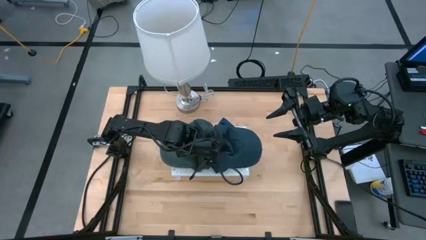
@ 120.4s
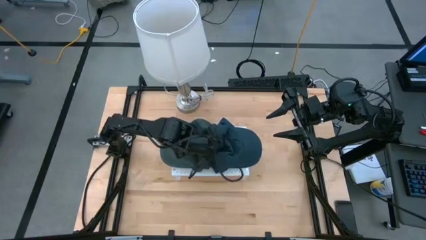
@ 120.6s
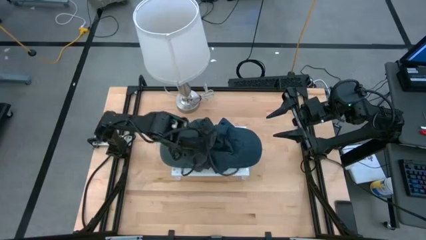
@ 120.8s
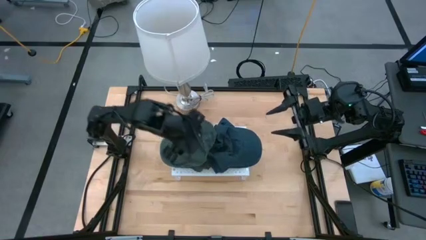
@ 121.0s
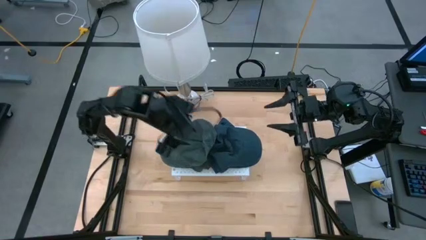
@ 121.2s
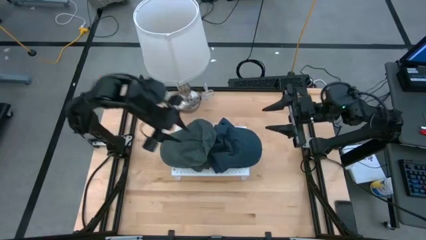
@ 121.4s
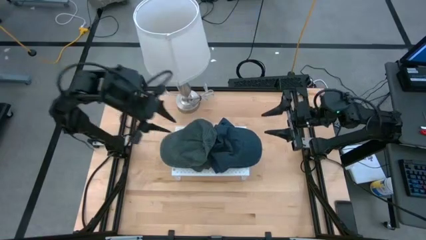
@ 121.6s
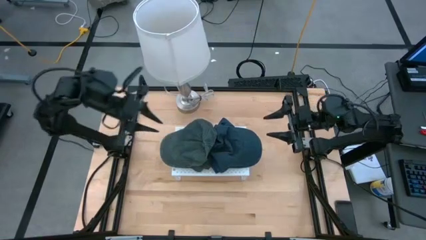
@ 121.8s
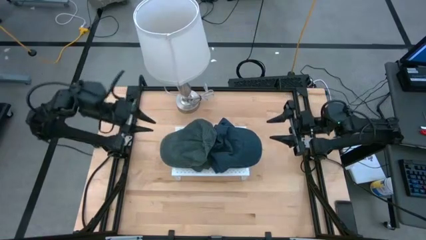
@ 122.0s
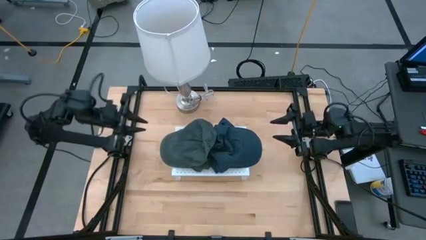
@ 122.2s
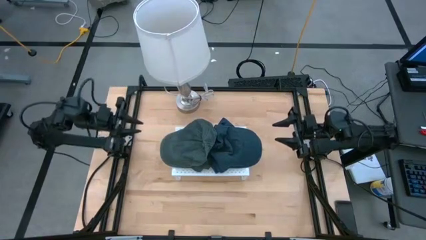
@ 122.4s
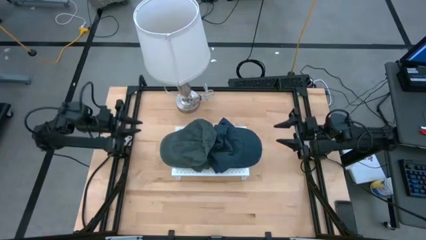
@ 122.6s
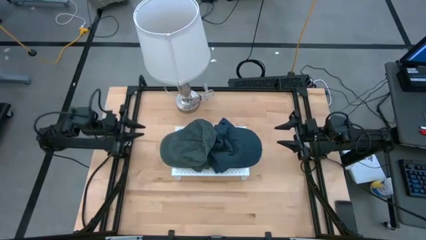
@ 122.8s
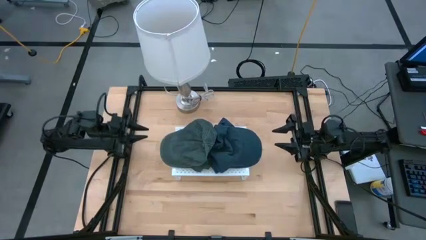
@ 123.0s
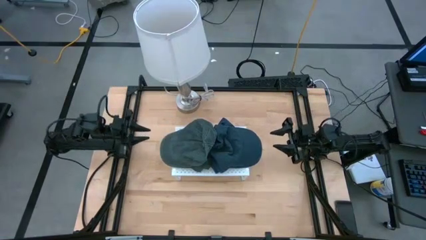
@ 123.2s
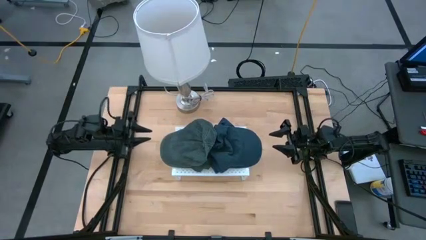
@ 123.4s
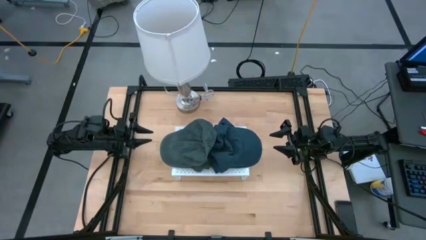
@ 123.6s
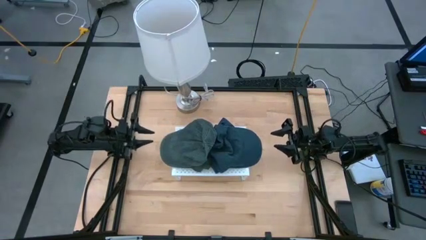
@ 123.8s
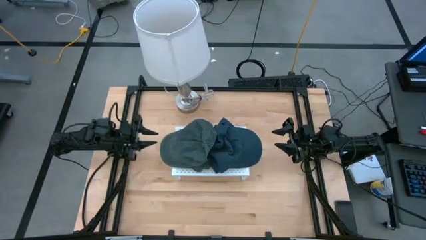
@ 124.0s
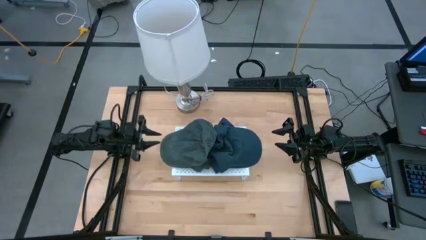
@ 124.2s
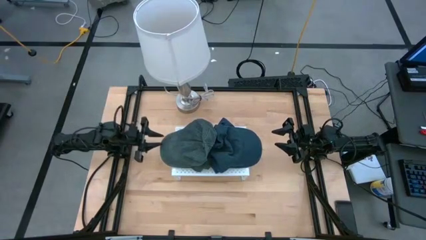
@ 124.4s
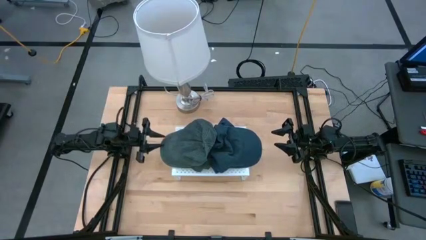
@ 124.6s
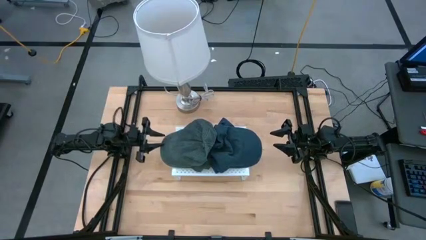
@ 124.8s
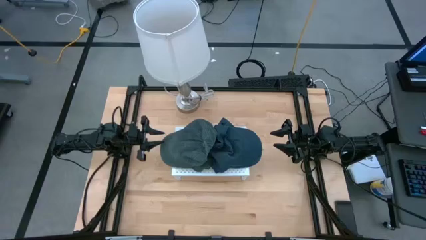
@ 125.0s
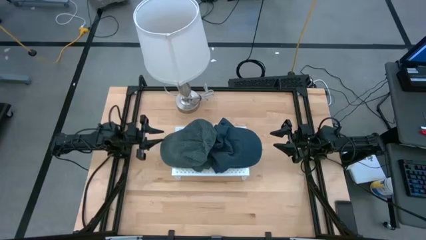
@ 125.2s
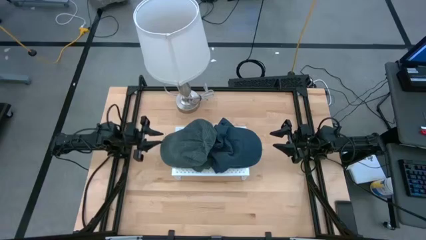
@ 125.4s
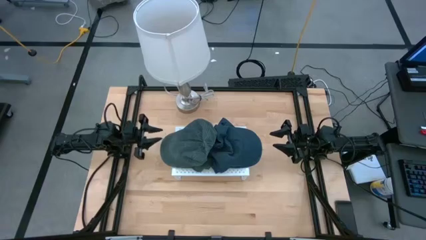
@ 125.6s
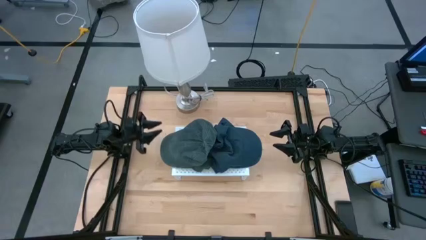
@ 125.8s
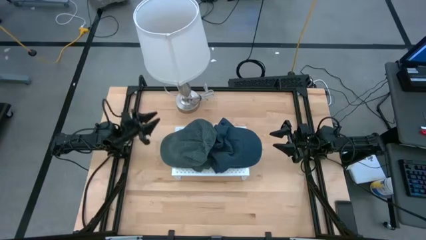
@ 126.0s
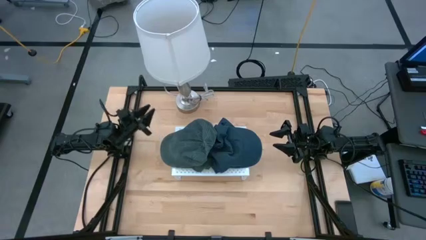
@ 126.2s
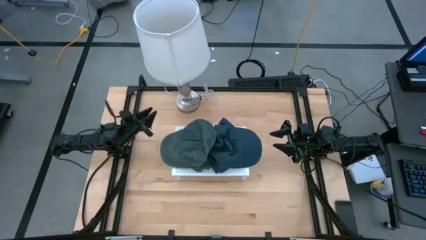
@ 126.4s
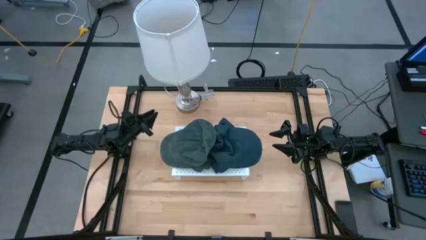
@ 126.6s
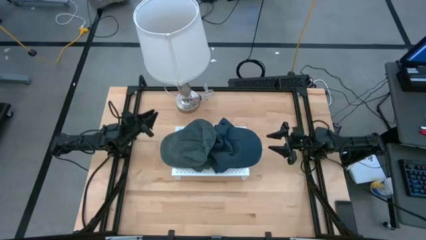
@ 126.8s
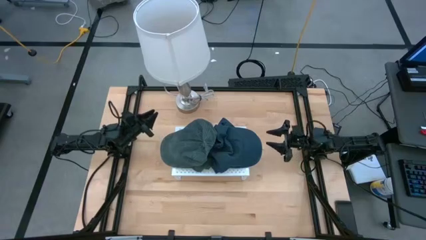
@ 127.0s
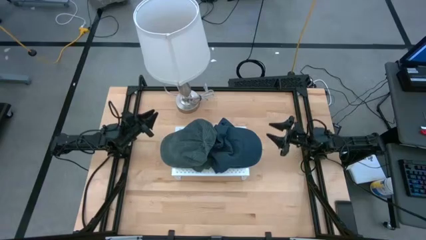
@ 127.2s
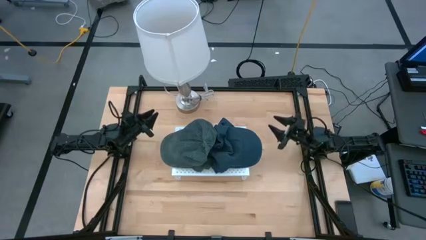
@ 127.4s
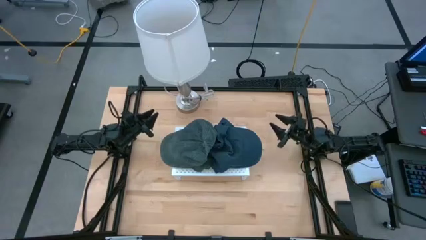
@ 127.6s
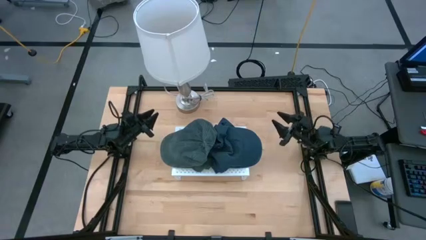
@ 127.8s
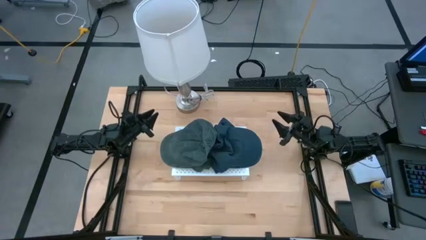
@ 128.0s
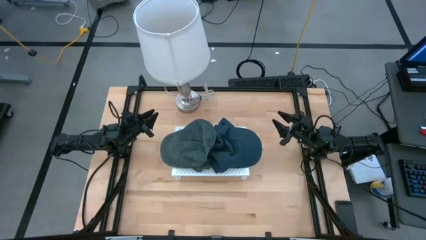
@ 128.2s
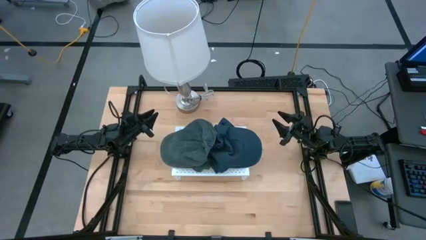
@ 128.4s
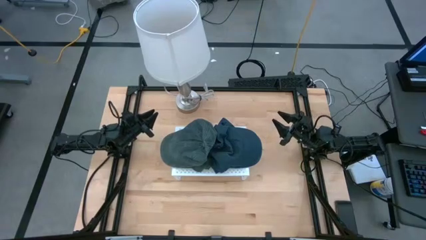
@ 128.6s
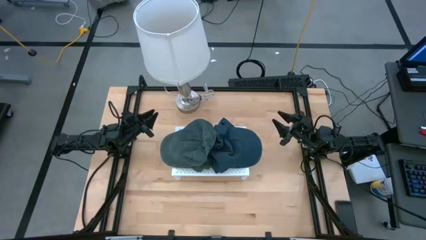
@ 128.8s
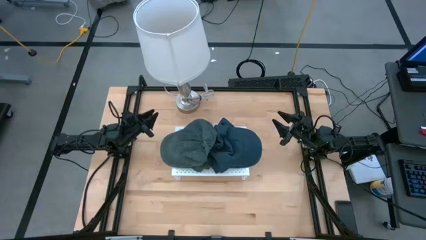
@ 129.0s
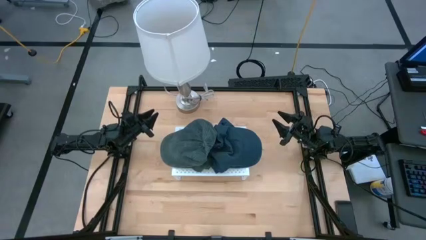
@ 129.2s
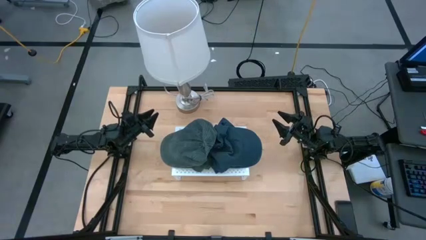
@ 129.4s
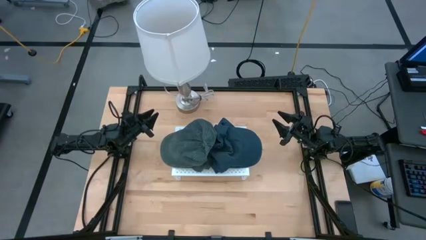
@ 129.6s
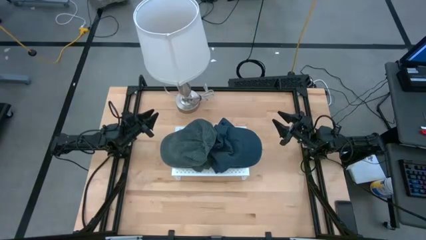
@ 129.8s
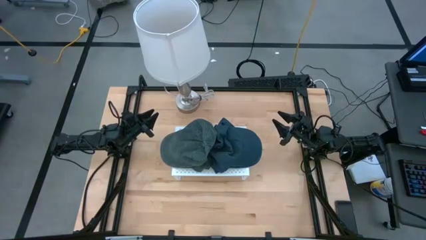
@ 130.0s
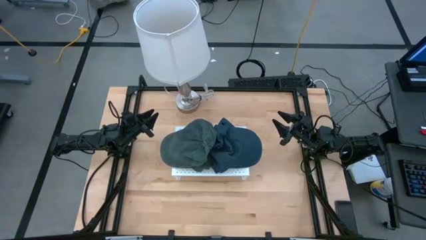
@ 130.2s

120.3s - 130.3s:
Task: Pick & Place hat
Return to Home Position

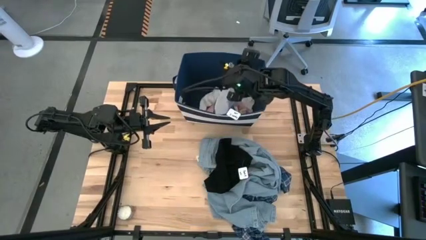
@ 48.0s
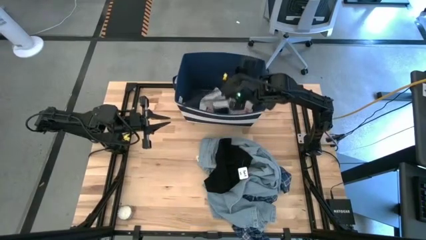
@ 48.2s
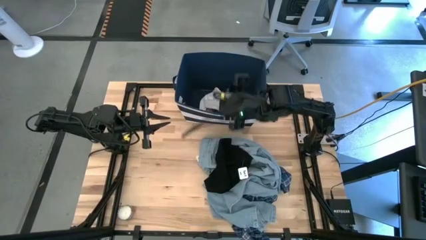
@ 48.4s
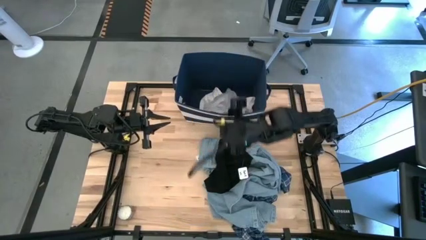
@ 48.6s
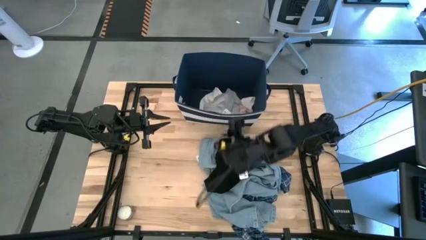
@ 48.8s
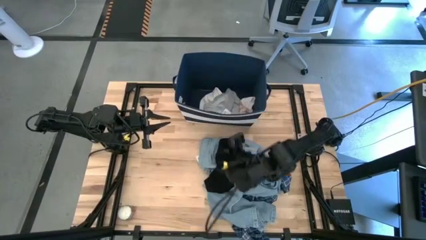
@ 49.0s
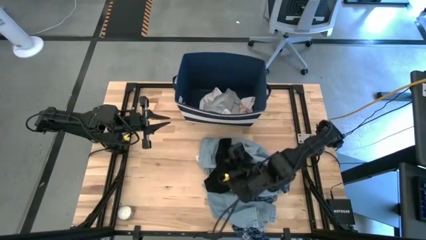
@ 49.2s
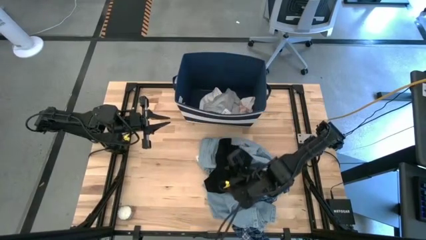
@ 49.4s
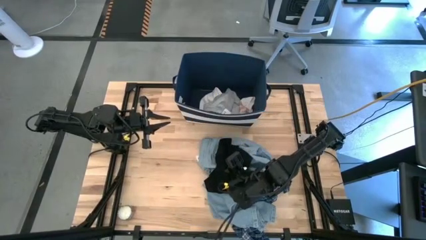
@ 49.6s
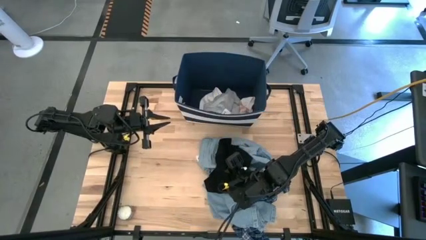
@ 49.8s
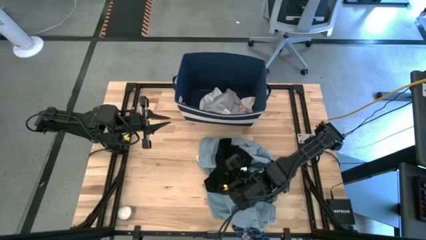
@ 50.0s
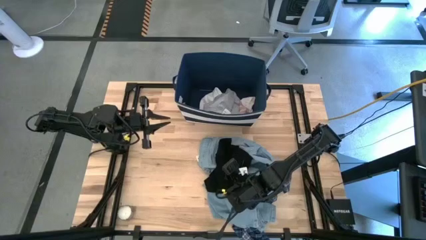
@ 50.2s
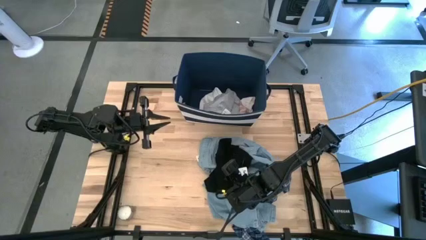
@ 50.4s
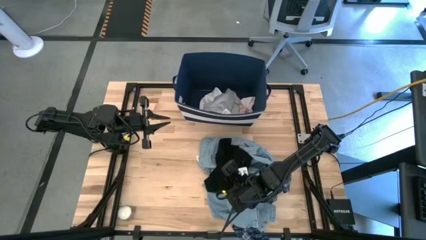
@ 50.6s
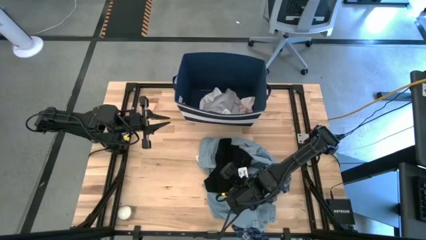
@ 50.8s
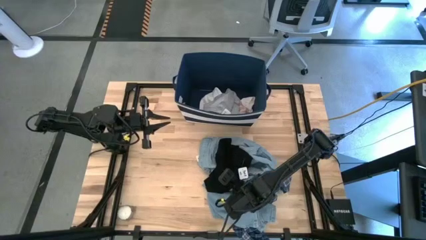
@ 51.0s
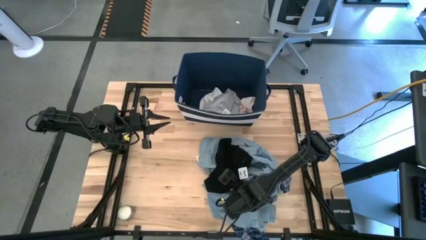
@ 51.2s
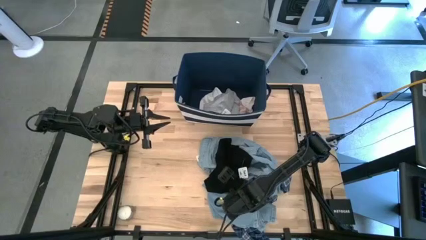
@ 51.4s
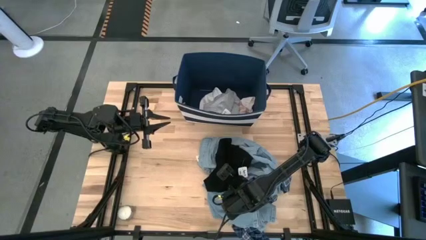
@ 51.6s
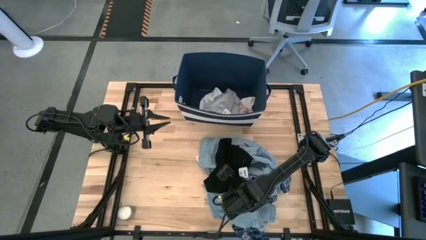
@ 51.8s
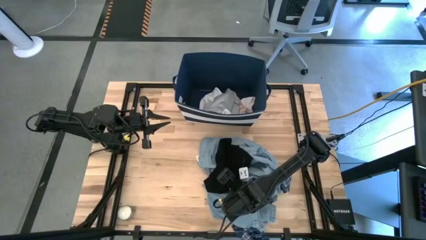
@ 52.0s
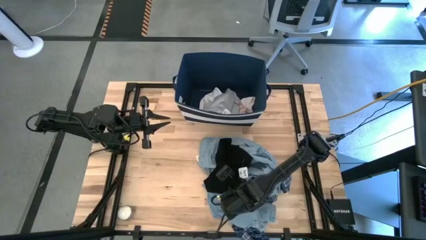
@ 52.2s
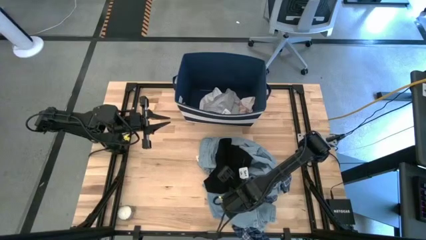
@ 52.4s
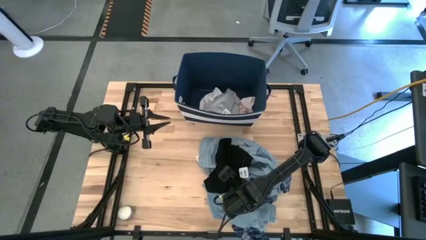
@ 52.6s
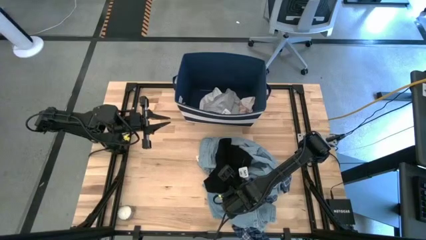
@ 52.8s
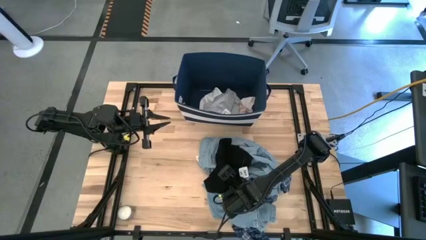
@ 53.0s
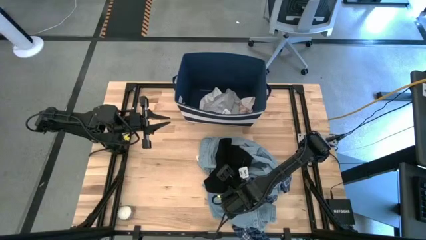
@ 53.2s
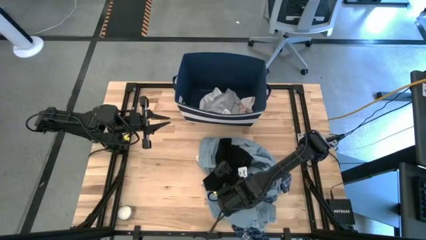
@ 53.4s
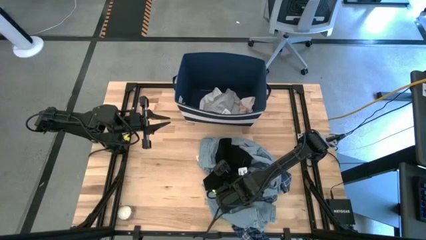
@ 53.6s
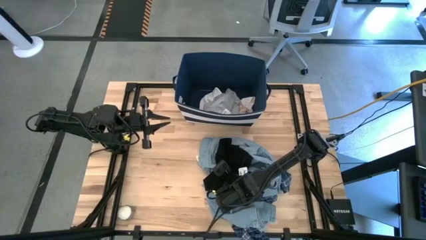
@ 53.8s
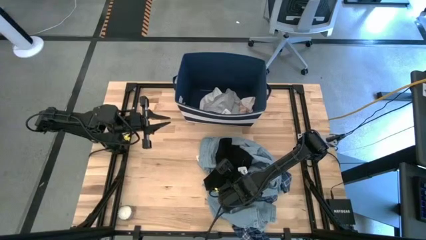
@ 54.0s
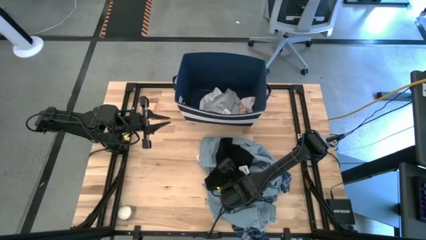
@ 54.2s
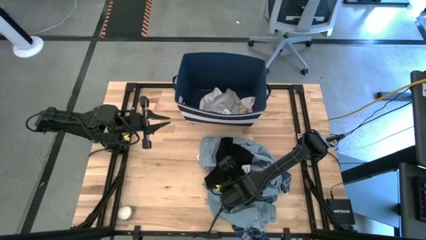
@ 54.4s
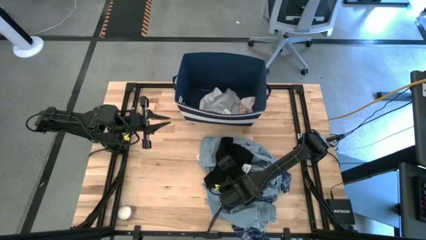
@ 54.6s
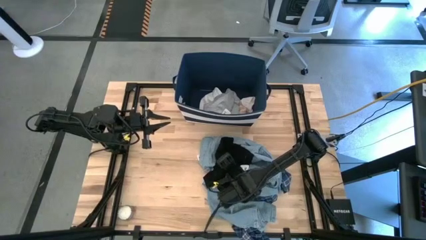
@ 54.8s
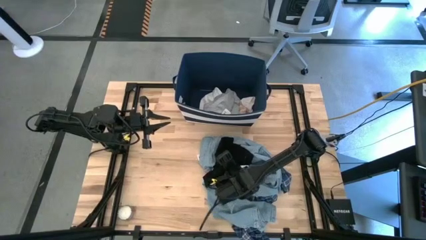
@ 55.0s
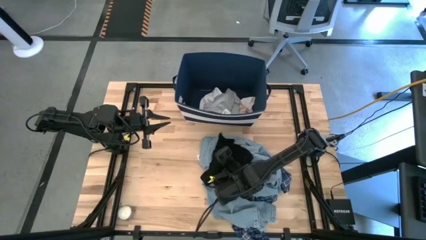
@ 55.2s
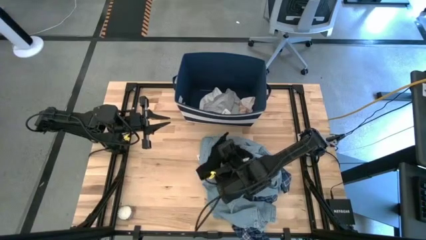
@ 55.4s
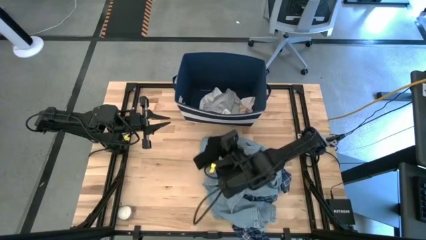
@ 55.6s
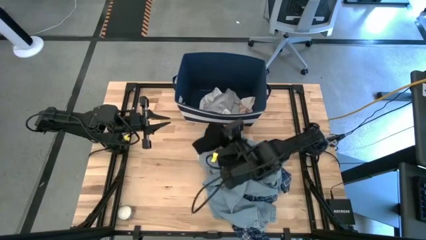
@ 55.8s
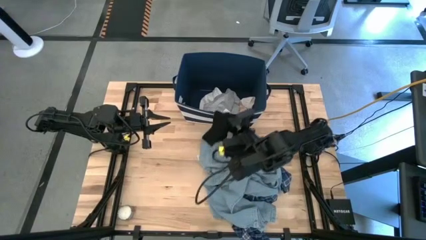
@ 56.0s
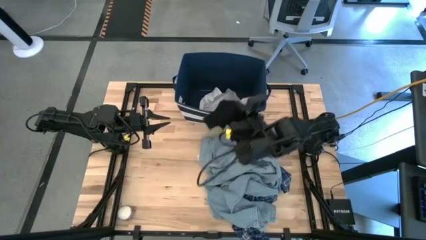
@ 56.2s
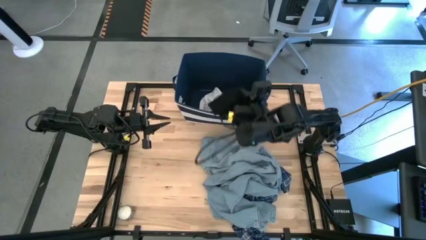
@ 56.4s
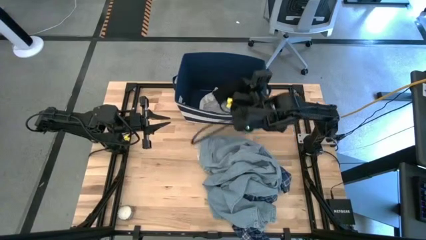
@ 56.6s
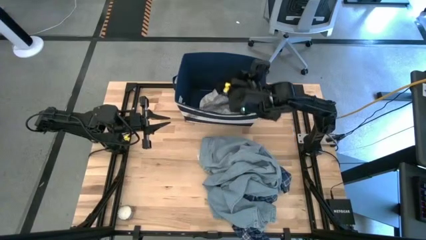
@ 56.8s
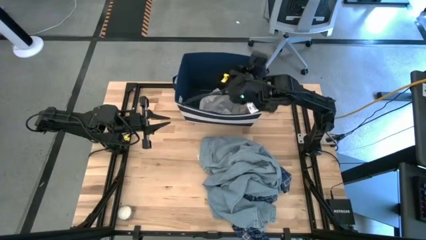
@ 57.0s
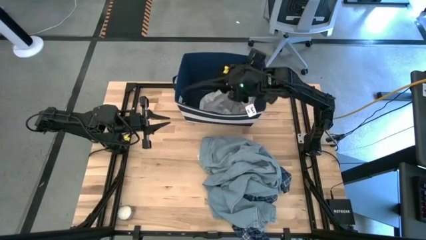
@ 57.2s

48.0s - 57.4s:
Task: Sort clothes
Put the black shorts into the blue bin
